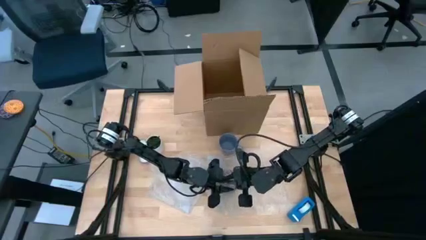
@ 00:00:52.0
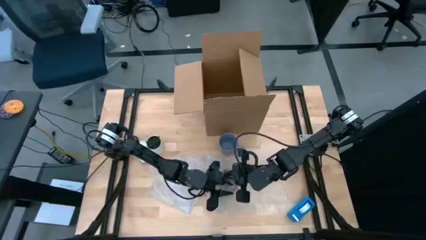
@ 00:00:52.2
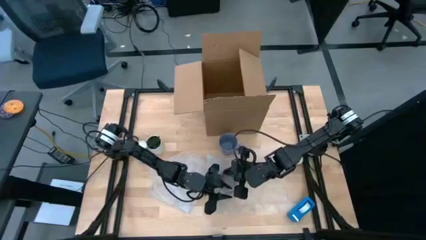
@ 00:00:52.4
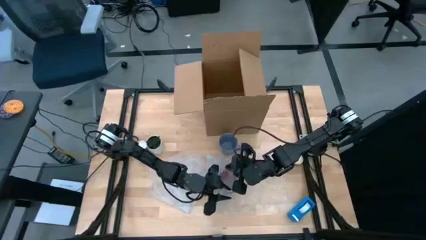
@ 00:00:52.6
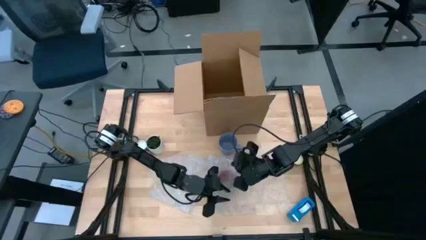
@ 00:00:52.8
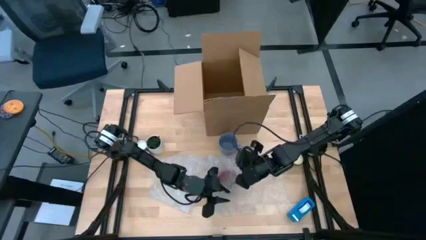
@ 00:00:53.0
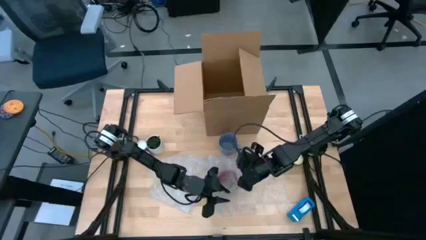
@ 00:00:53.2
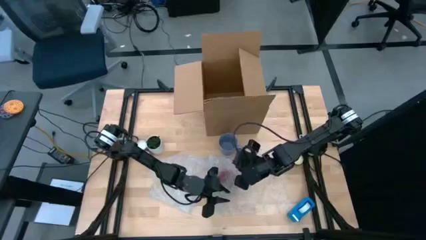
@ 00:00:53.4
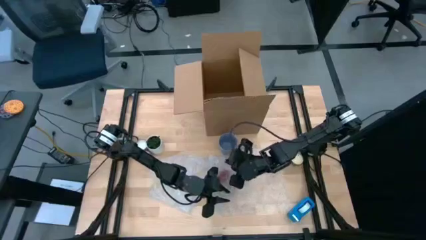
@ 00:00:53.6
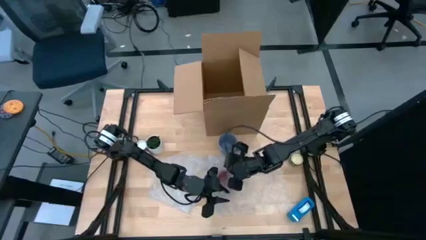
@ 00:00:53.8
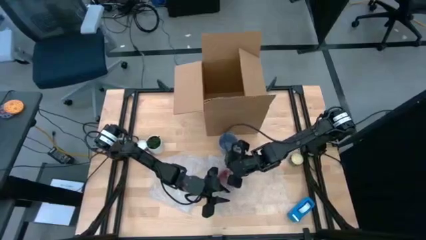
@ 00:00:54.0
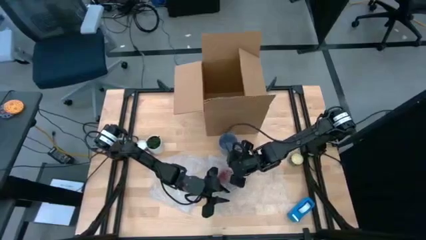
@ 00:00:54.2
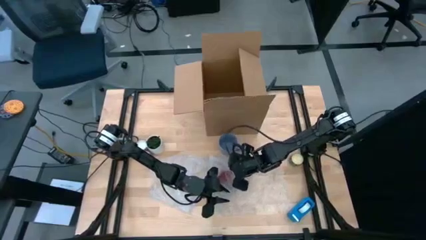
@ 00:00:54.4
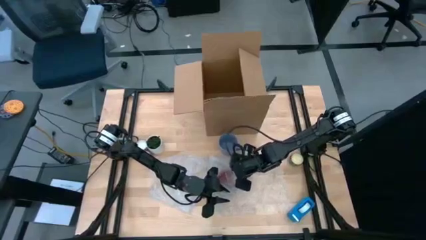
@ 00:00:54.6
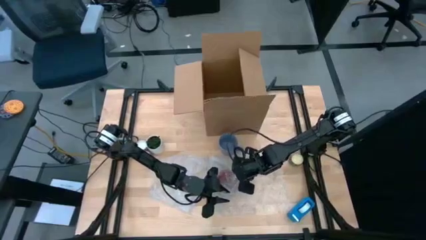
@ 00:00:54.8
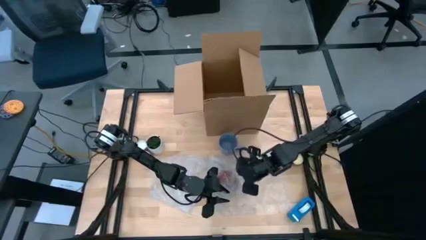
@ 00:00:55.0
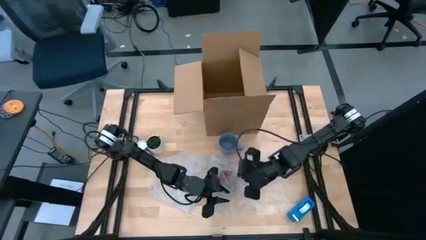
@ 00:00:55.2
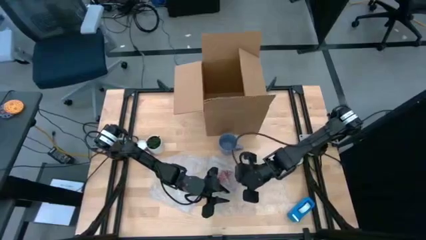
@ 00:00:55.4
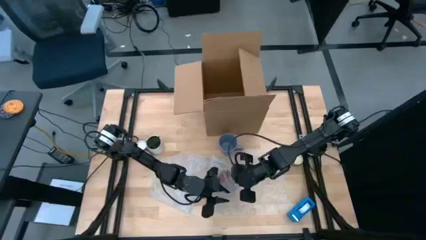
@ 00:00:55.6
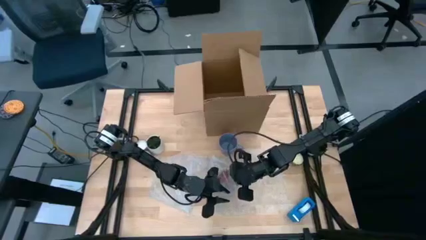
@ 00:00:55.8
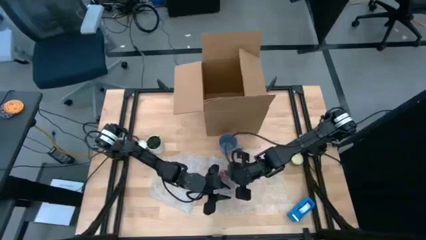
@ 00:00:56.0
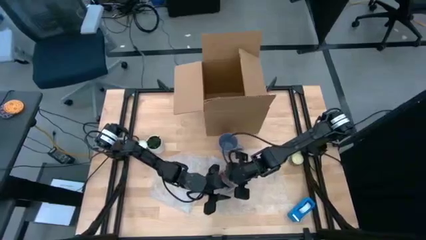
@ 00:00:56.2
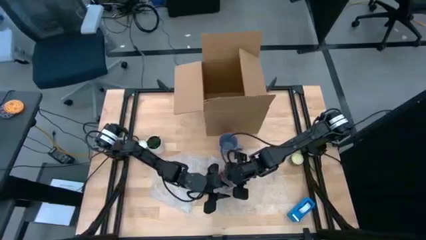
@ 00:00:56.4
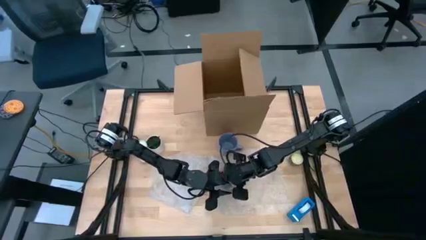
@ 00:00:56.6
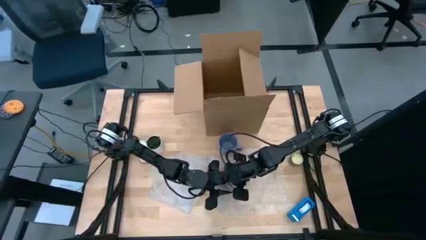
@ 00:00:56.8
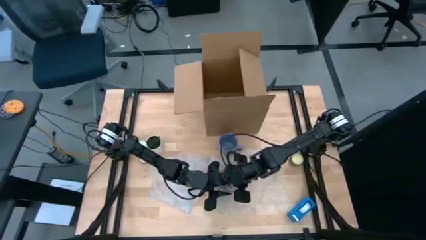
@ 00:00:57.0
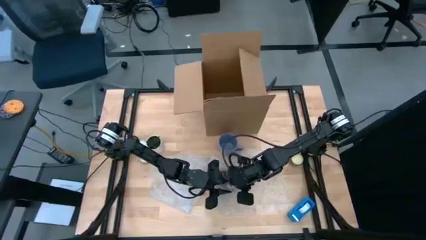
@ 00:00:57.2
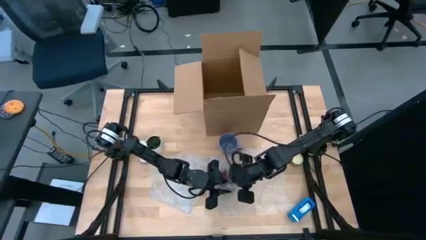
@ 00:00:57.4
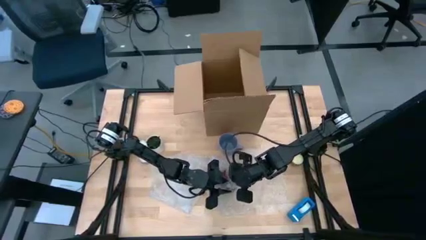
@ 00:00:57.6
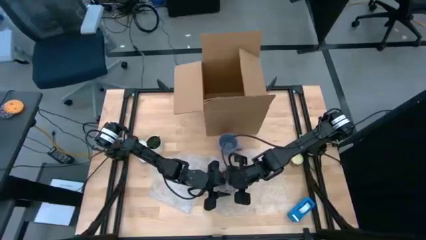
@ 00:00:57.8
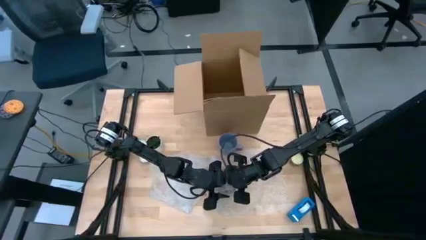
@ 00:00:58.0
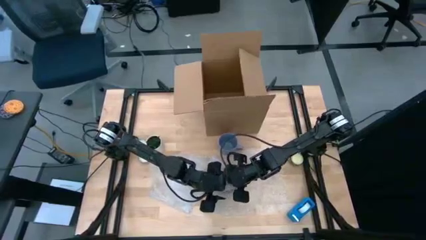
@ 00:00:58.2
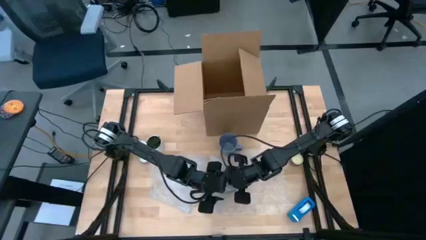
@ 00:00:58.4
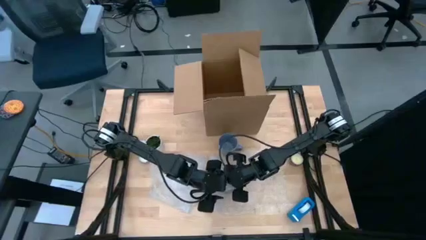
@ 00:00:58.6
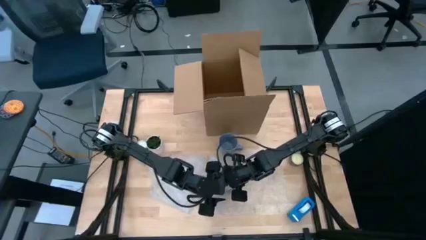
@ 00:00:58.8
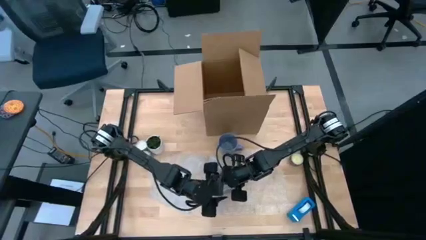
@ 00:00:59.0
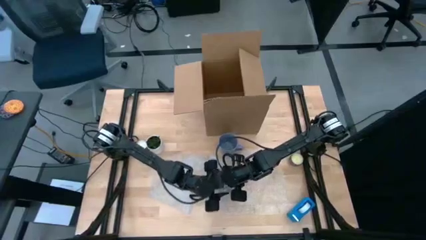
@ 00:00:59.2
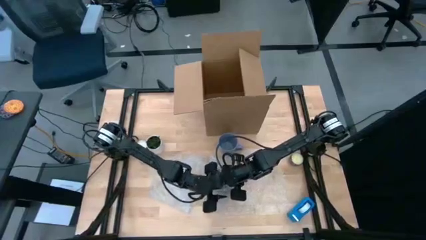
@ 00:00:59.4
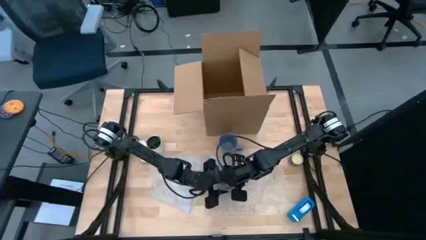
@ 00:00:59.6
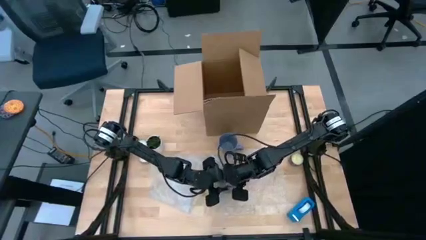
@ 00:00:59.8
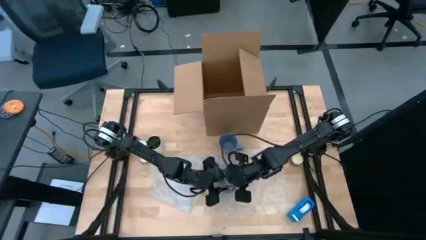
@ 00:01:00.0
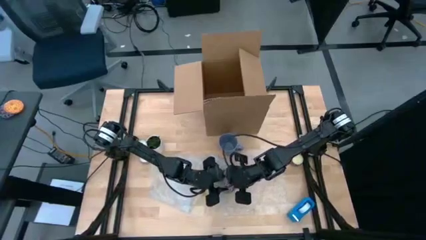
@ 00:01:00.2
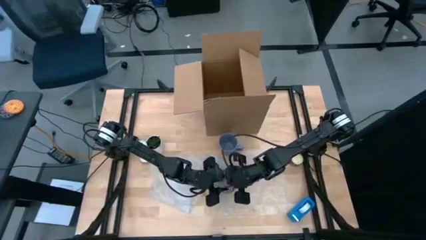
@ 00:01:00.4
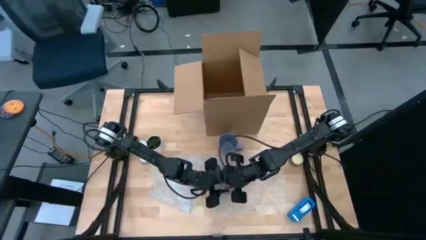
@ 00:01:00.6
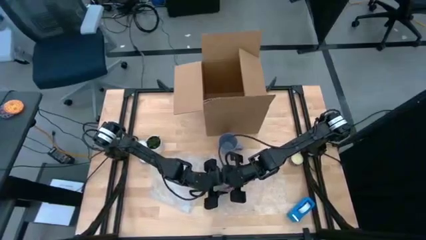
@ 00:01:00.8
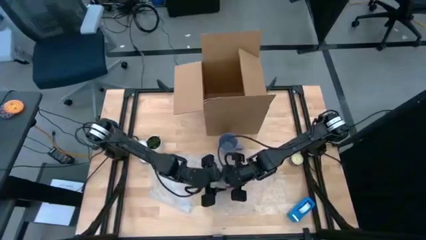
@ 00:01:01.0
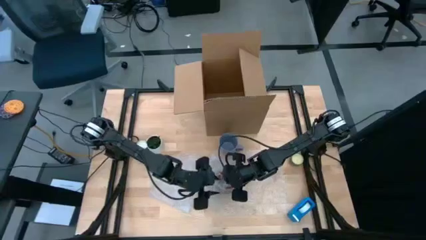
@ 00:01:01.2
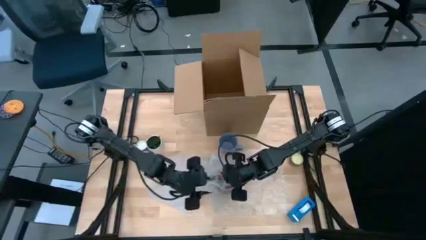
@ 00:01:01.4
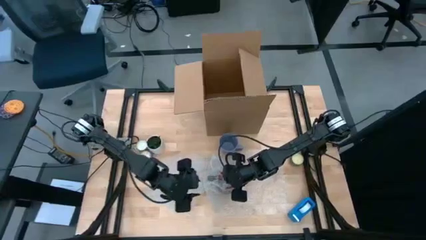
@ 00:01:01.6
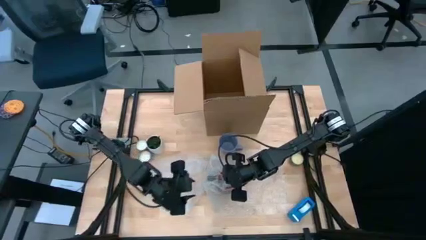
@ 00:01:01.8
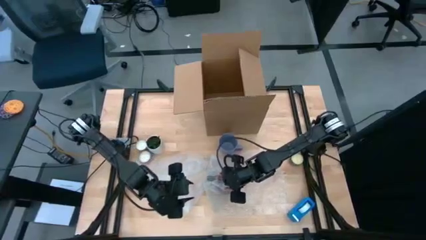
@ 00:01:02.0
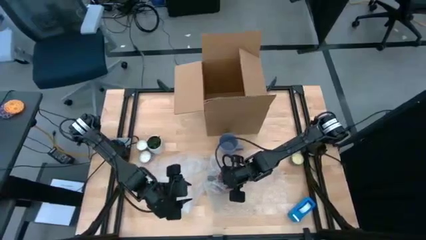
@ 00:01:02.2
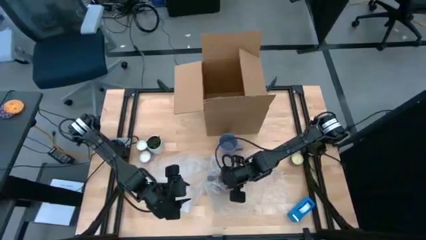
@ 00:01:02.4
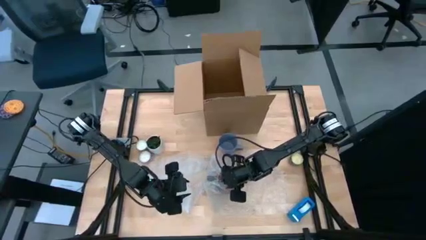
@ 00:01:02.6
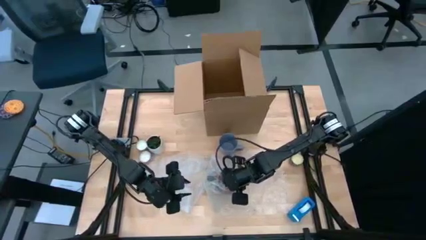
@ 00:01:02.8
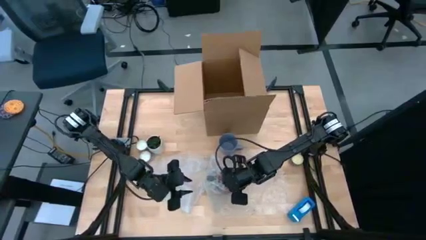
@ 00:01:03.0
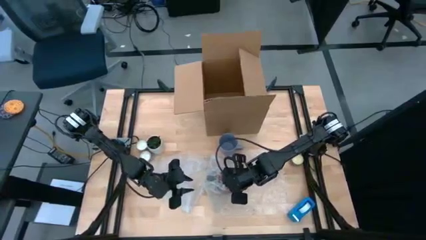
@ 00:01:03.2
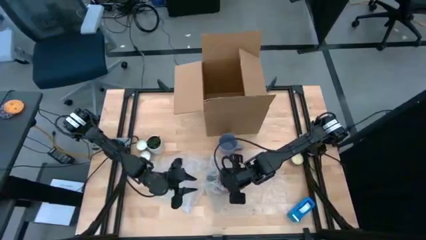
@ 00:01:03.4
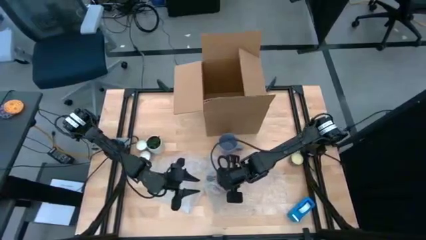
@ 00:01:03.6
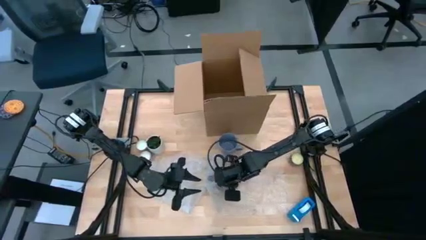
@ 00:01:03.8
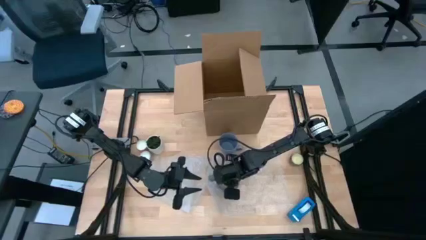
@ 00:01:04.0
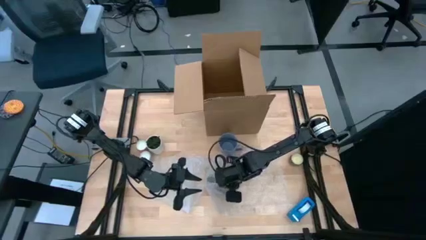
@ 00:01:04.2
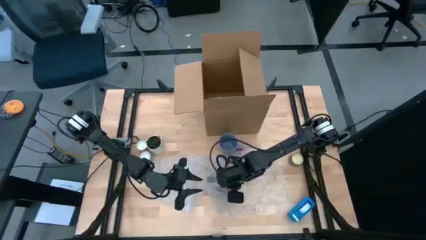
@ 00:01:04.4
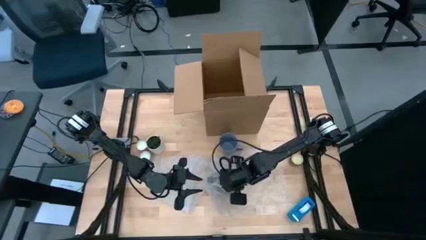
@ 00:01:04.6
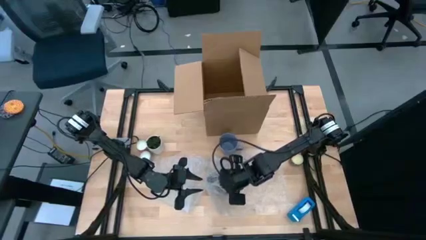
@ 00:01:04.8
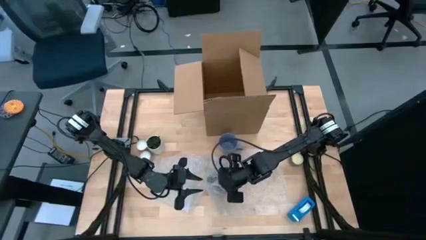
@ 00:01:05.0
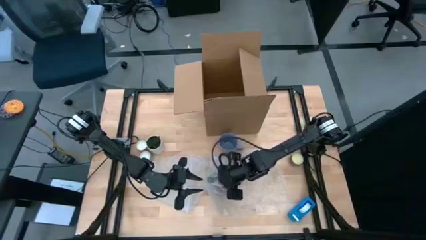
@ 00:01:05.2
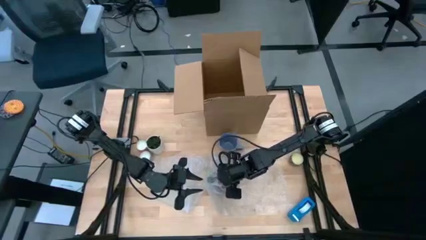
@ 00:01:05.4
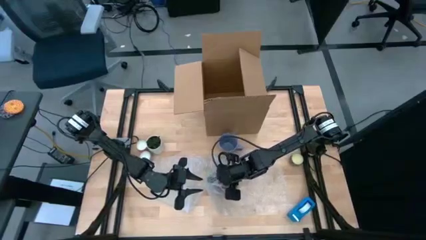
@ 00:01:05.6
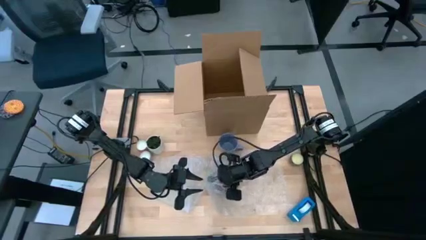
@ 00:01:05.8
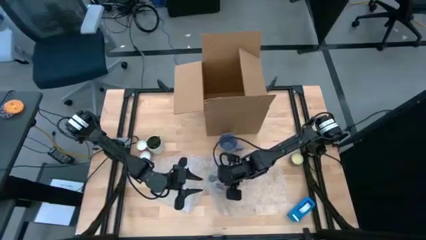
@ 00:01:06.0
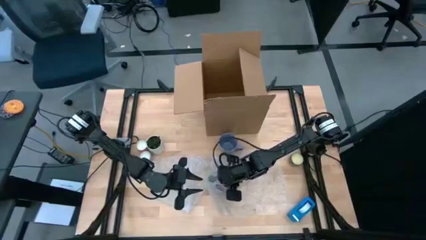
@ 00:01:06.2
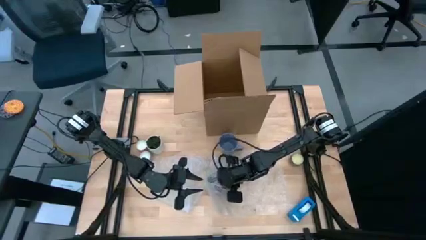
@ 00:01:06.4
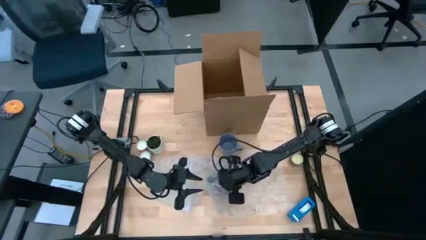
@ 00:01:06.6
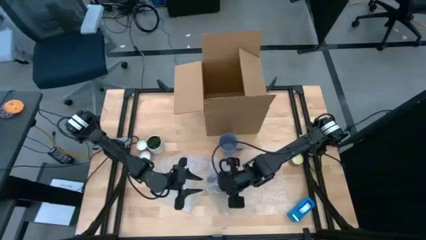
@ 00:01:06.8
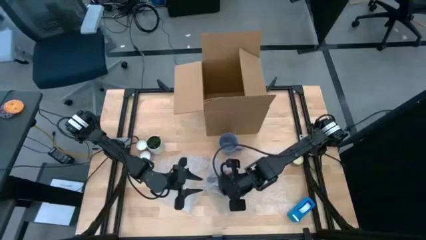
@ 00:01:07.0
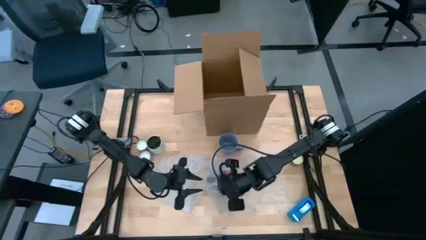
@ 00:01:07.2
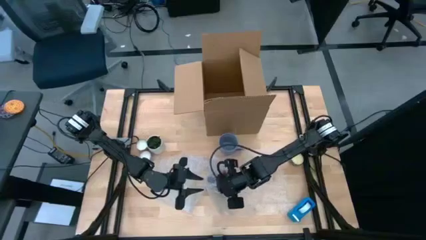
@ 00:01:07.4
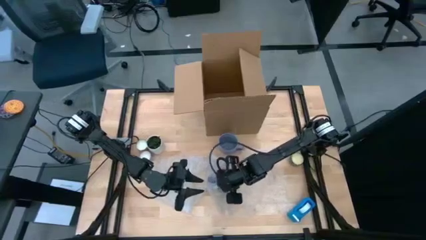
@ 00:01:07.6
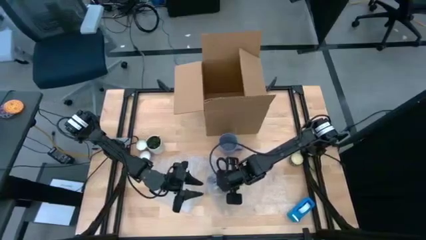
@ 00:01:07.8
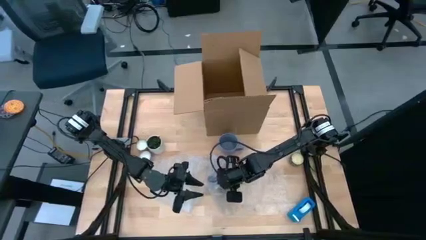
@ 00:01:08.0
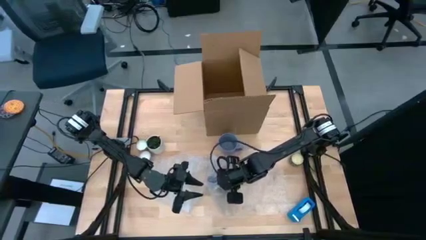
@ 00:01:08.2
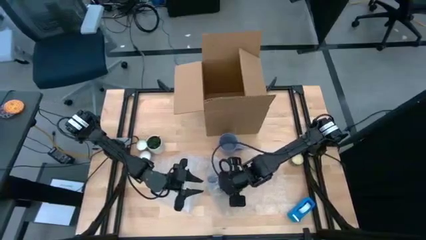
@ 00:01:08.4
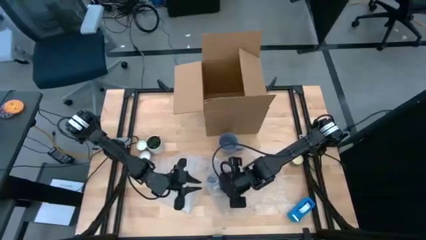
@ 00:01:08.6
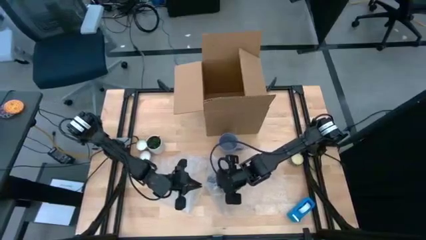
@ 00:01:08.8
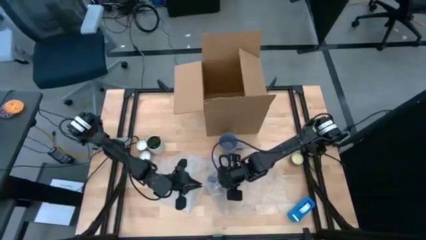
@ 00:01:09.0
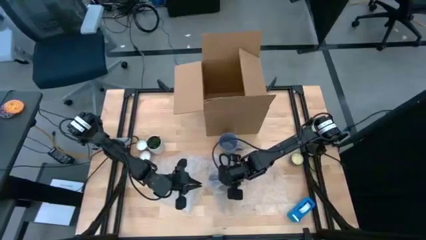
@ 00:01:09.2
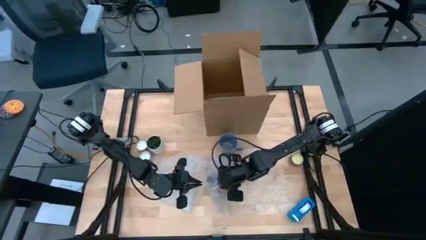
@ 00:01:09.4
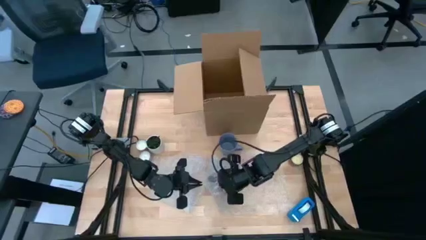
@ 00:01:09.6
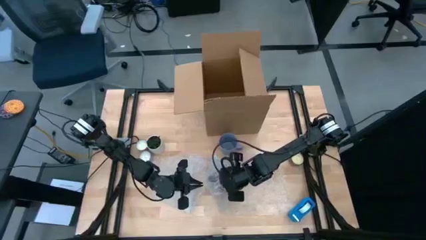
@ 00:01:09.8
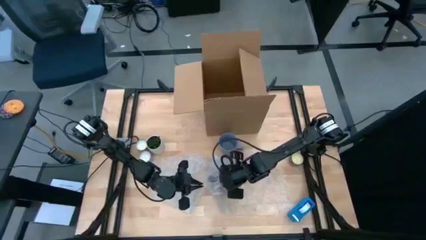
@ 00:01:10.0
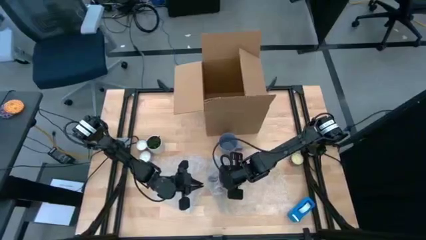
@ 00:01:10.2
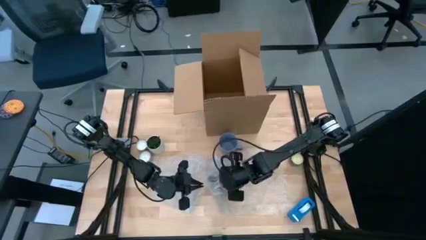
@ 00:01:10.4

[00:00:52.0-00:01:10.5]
Task: wrap mug
Wrap the black mug with the top bubble wrap
